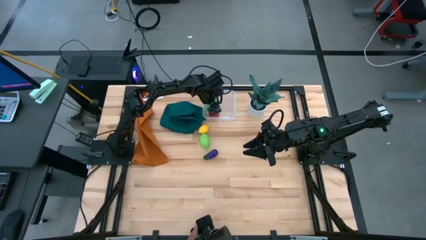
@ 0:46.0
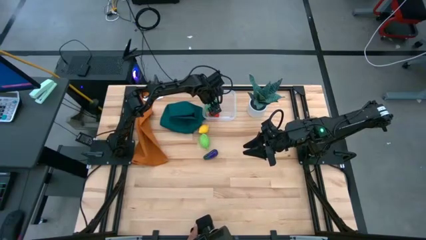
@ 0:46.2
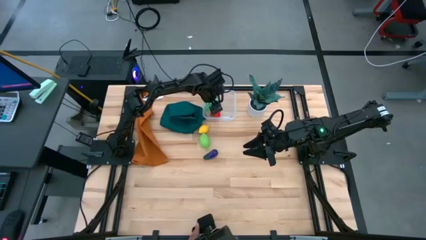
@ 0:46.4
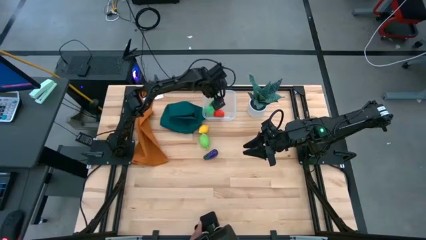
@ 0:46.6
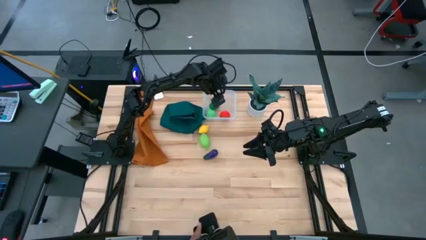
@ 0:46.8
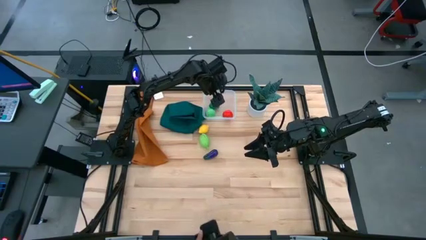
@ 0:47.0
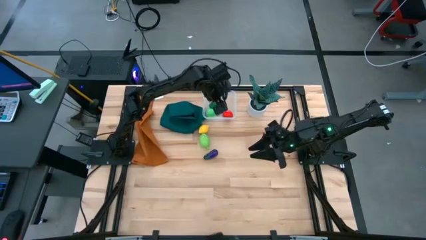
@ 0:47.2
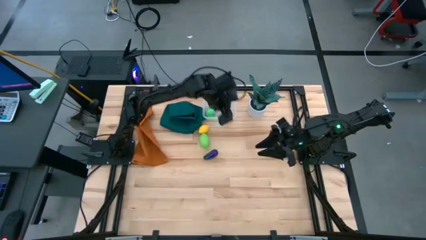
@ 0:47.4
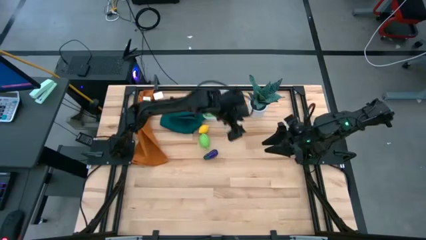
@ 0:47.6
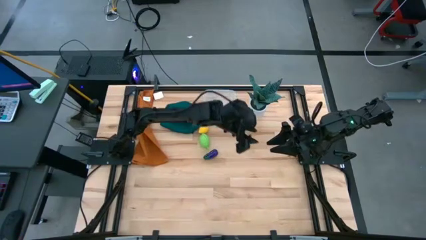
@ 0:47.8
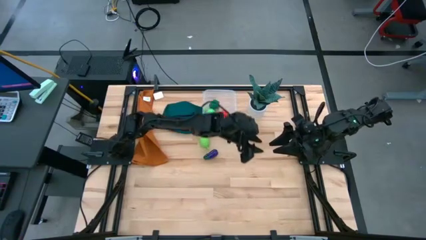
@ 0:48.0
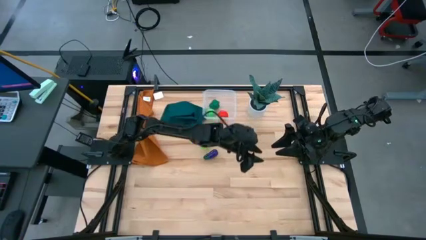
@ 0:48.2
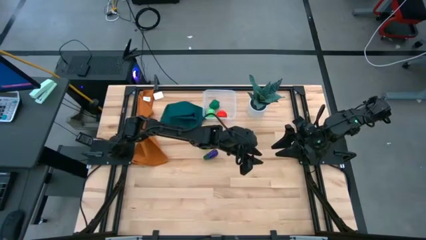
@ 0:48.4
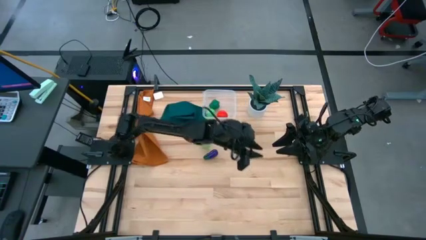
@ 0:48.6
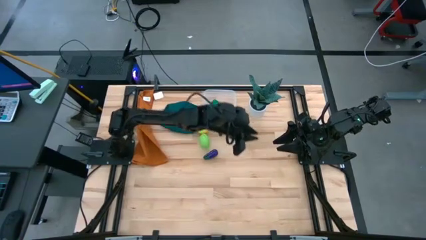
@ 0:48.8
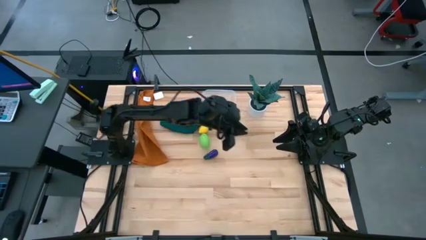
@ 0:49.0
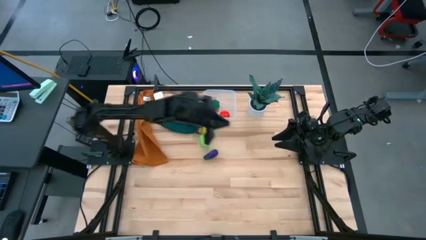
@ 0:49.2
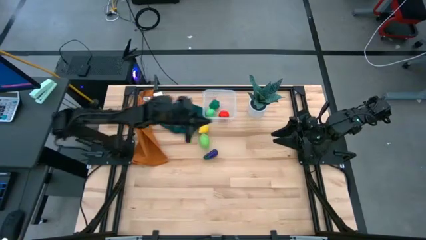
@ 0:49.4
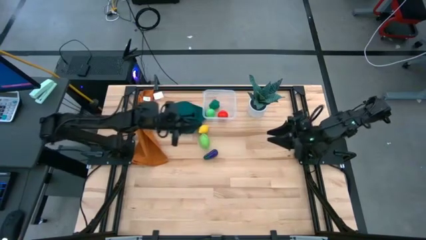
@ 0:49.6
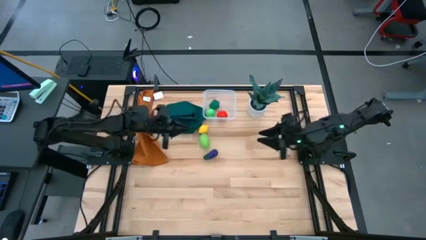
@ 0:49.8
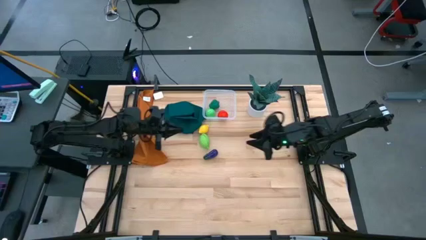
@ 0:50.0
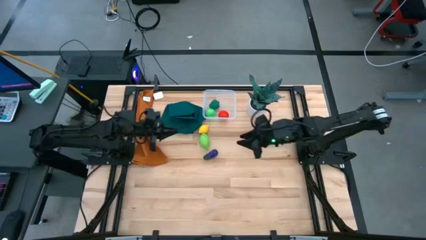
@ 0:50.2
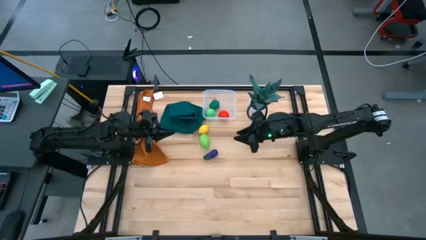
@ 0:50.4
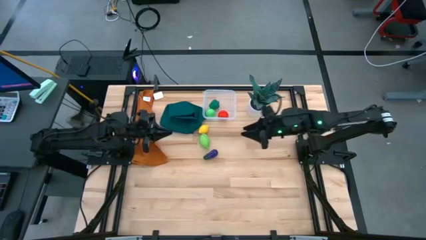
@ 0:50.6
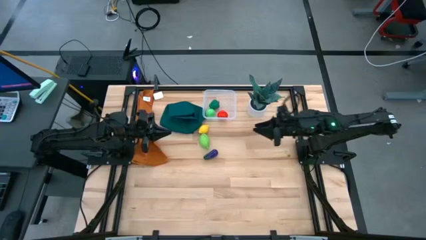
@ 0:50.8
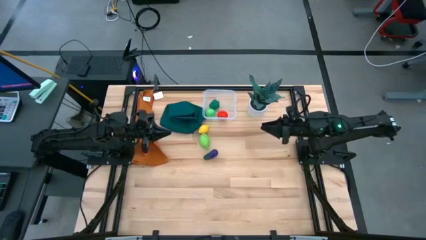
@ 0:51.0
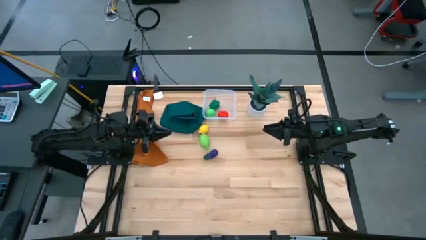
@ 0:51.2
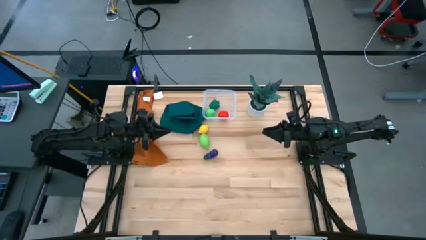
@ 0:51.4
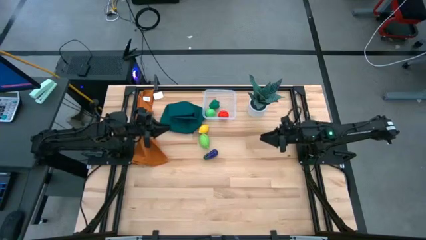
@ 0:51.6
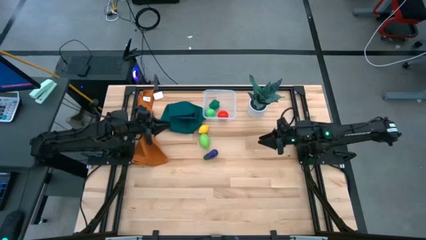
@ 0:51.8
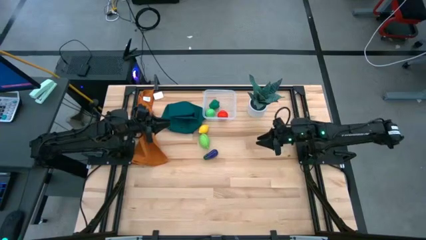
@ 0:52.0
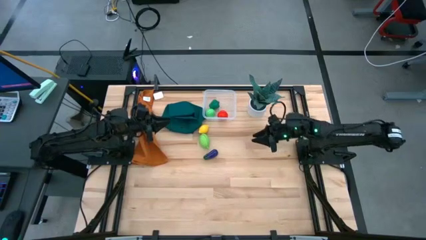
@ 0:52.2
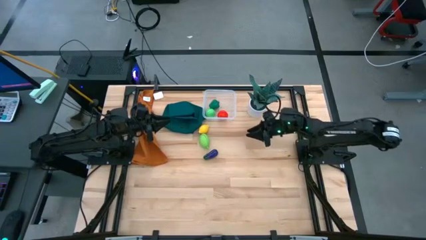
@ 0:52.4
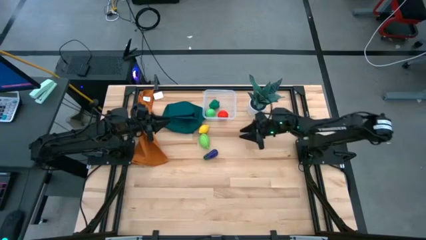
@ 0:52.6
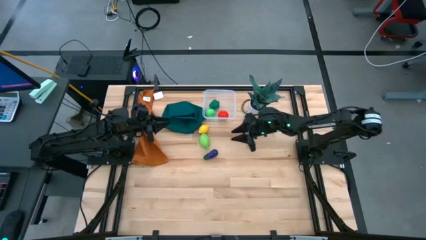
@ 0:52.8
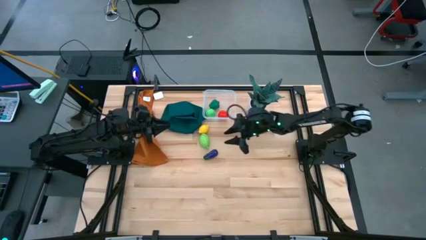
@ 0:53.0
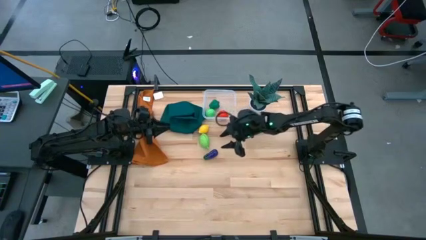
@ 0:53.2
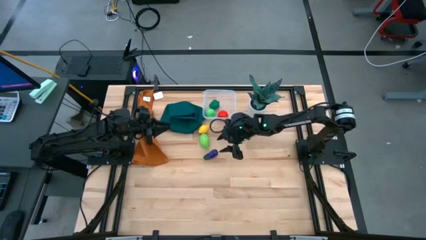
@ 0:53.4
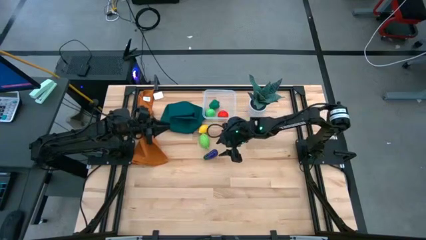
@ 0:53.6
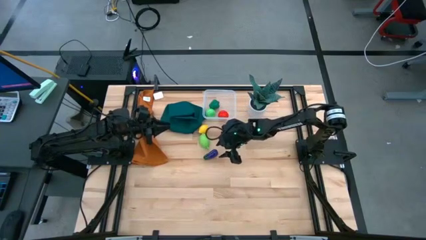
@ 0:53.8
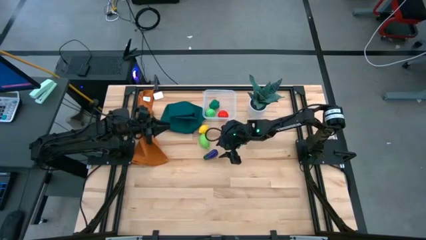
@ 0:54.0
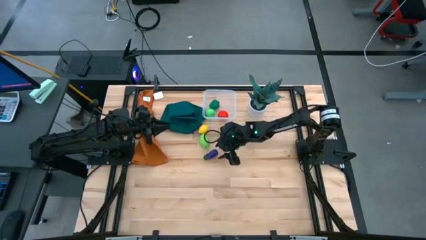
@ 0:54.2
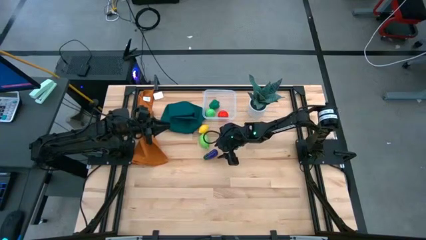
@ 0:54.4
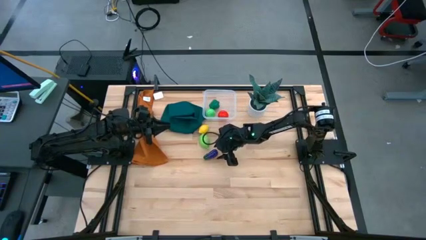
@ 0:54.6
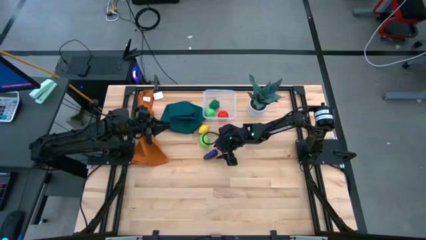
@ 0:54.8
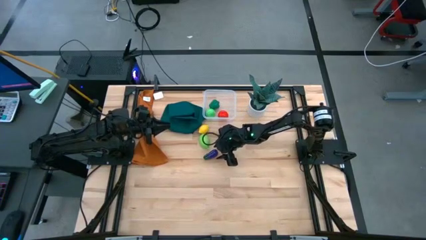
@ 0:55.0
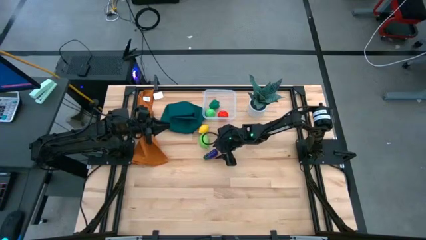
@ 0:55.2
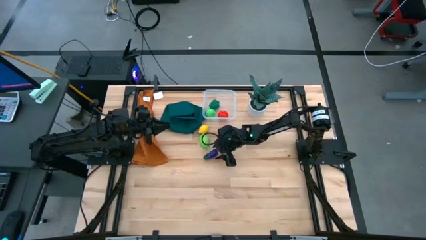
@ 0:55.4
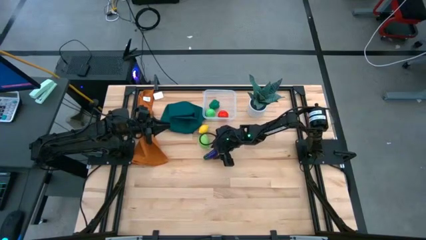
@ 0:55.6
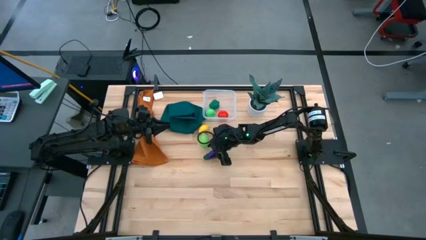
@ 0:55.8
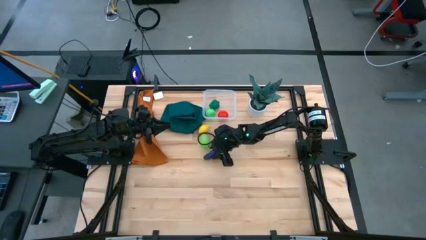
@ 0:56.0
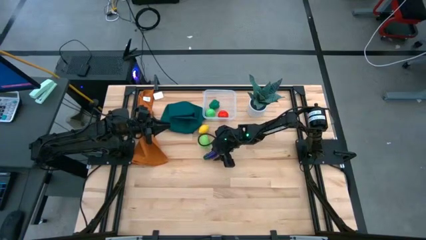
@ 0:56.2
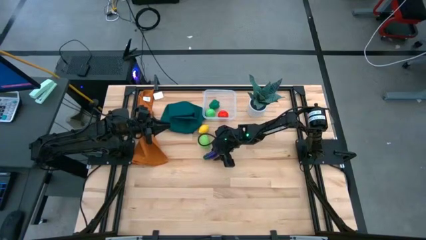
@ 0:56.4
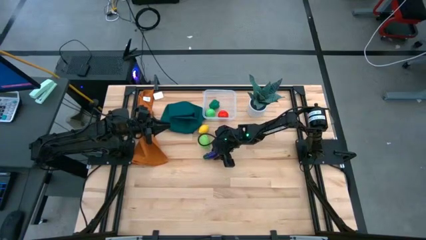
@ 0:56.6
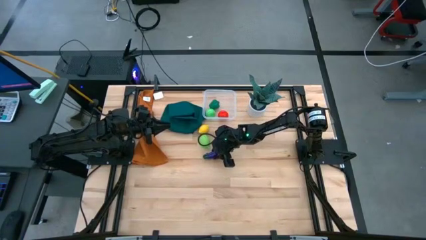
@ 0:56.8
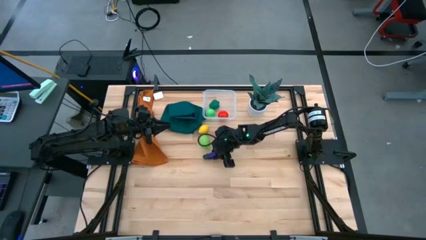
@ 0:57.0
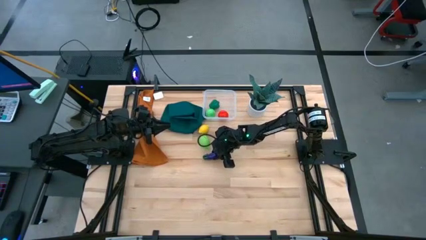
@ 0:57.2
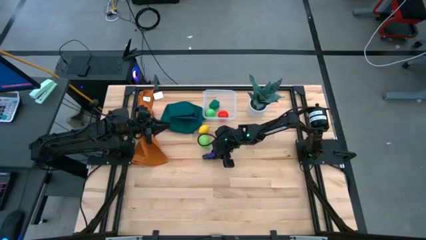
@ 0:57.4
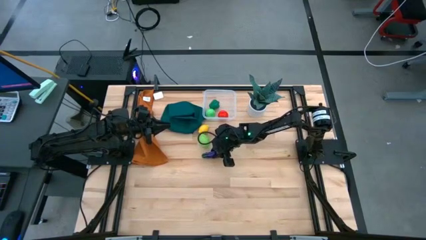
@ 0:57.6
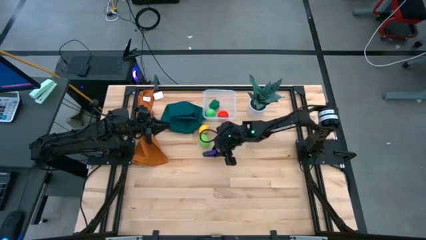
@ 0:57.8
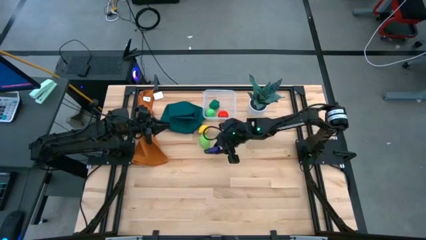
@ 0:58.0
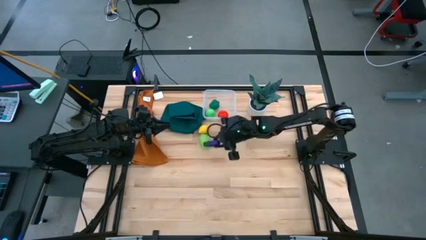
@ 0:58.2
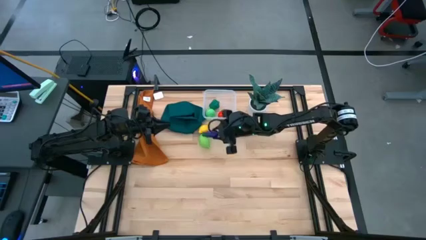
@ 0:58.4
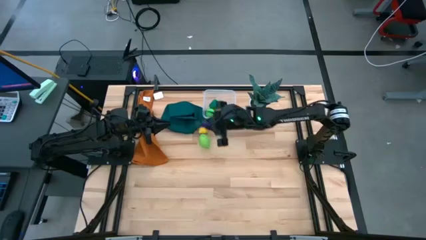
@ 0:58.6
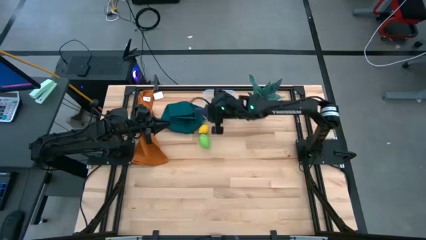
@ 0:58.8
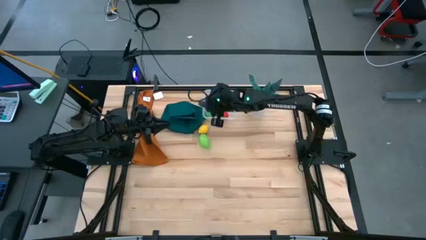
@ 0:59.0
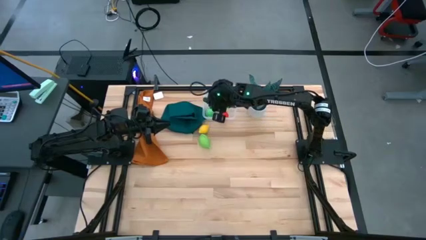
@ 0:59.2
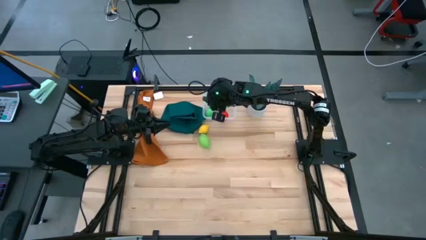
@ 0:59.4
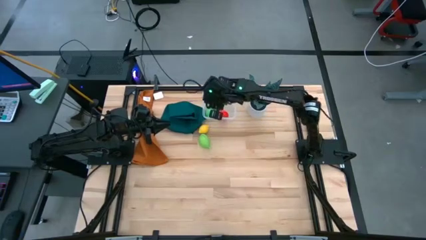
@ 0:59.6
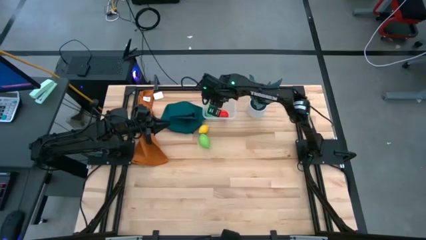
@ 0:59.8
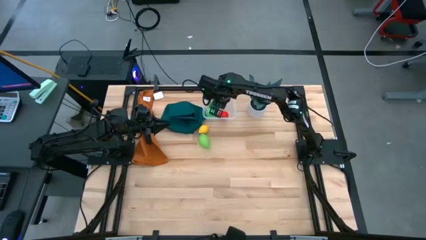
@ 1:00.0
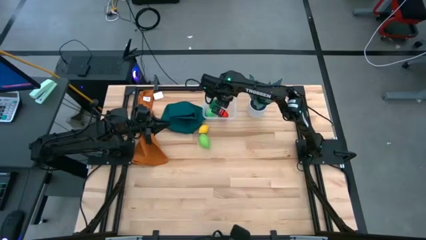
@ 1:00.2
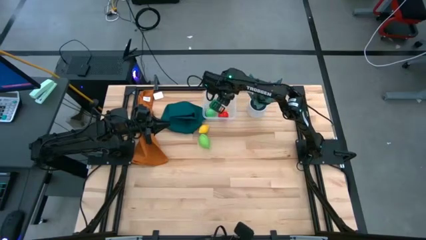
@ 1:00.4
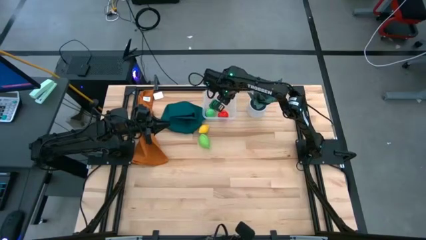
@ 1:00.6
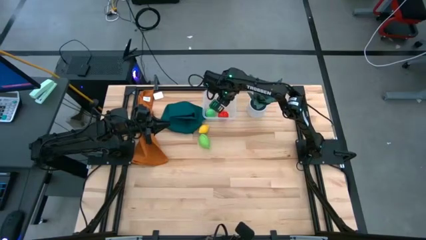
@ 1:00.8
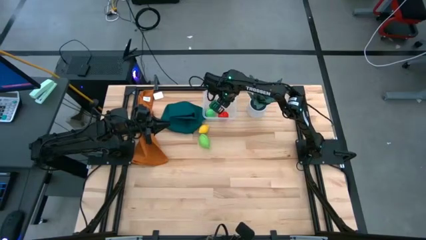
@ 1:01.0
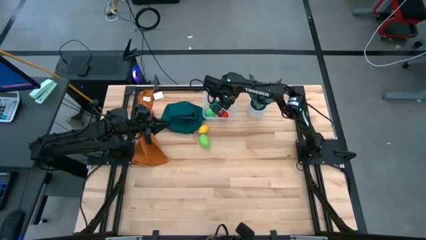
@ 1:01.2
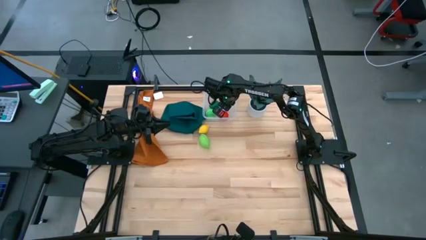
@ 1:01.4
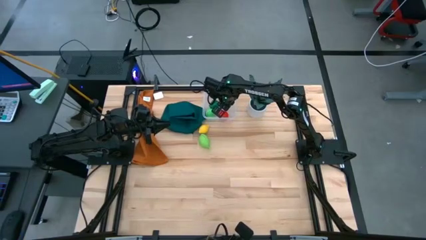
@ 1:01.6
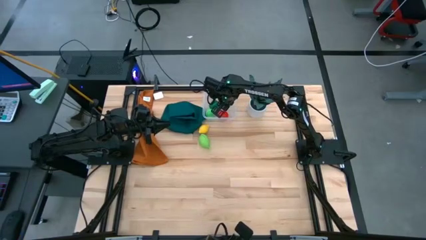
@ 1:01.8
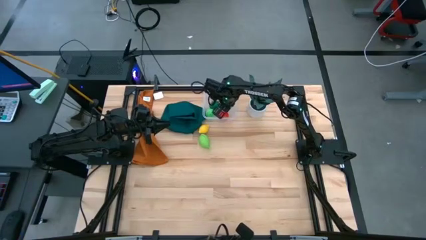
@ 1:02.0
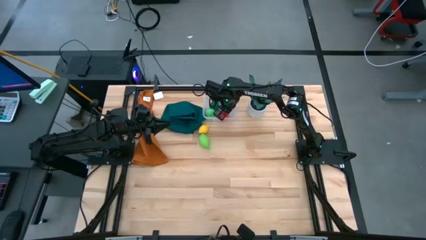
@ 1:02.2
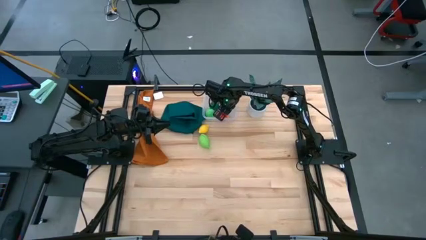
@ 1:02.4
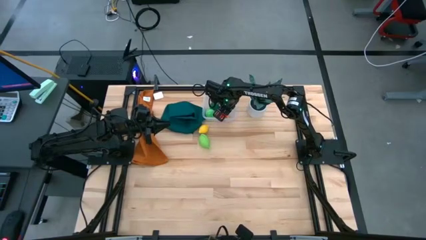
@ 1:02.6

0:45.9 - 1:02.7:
Task: Pick and placing Produce into tupperware
Put the violet eggplant into the transparent bin
